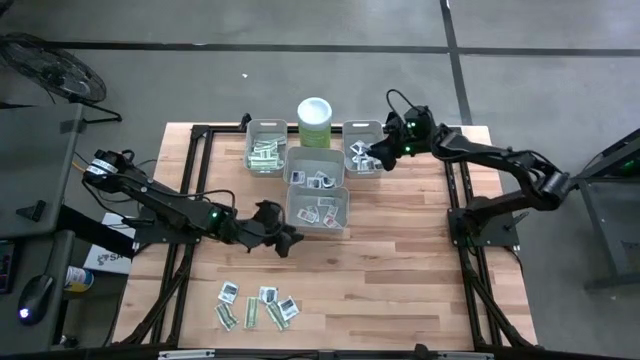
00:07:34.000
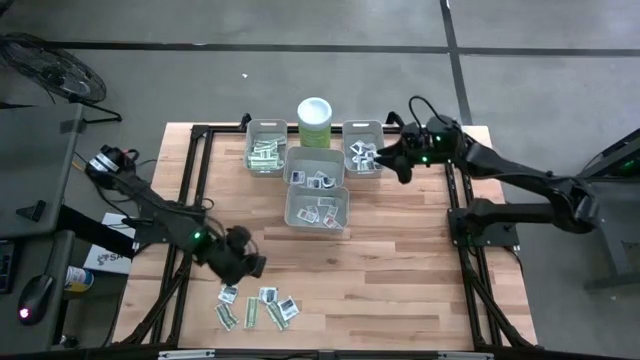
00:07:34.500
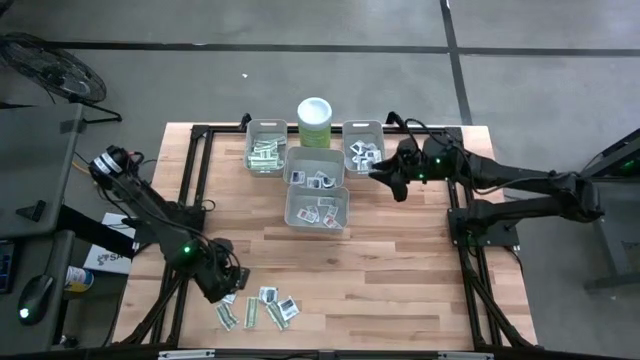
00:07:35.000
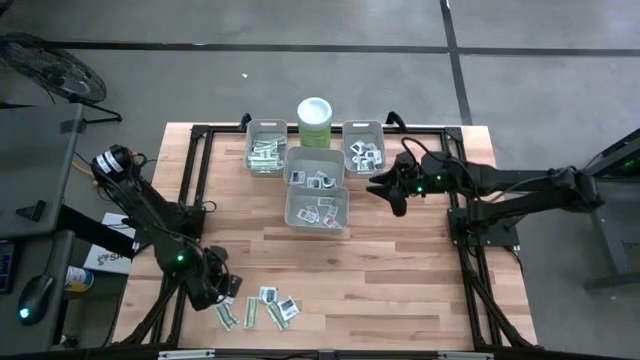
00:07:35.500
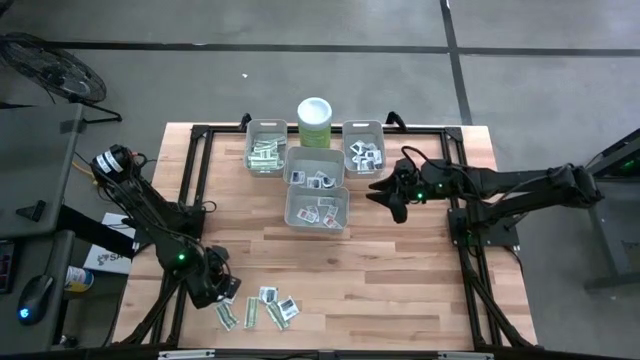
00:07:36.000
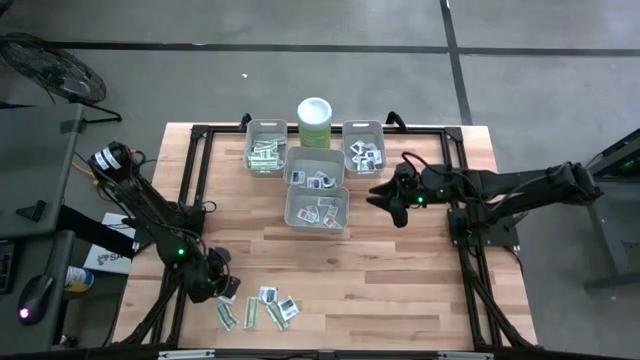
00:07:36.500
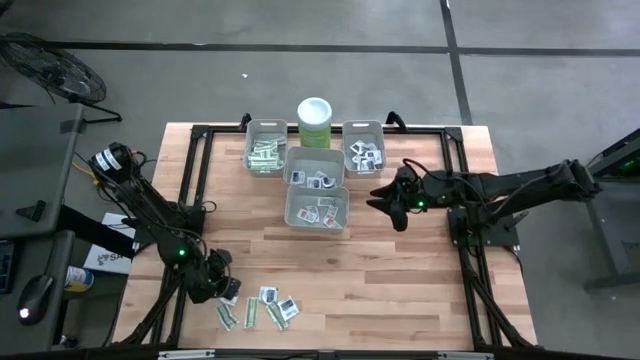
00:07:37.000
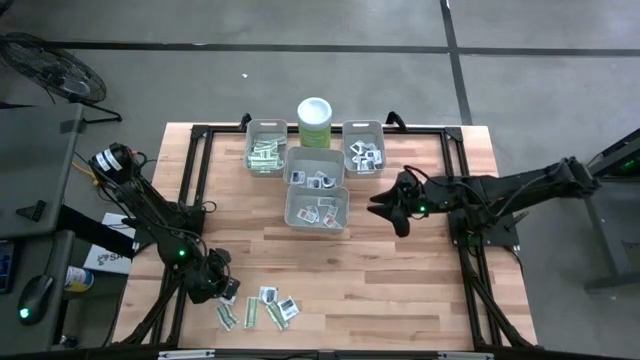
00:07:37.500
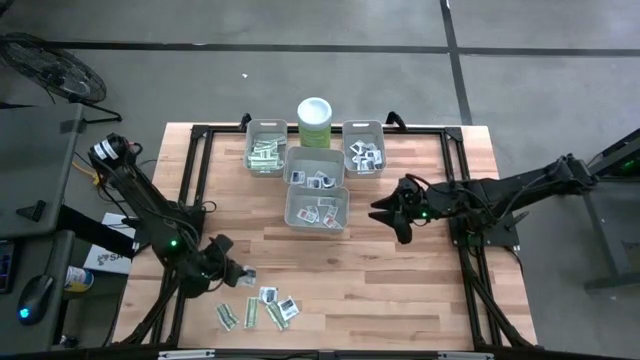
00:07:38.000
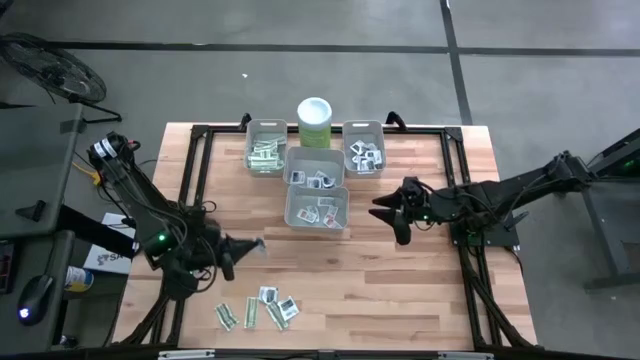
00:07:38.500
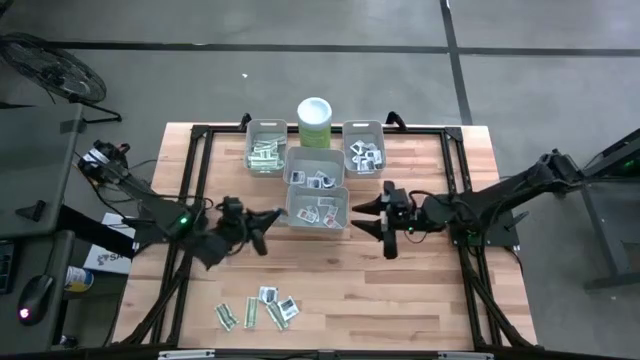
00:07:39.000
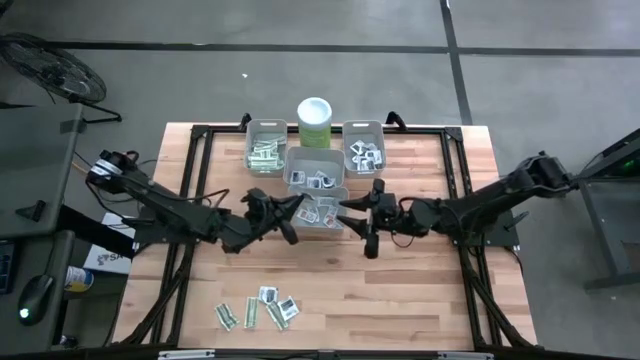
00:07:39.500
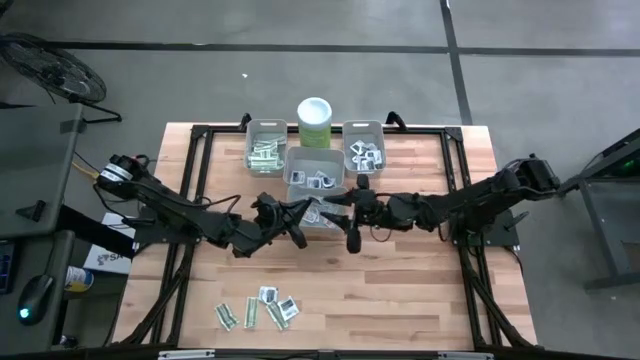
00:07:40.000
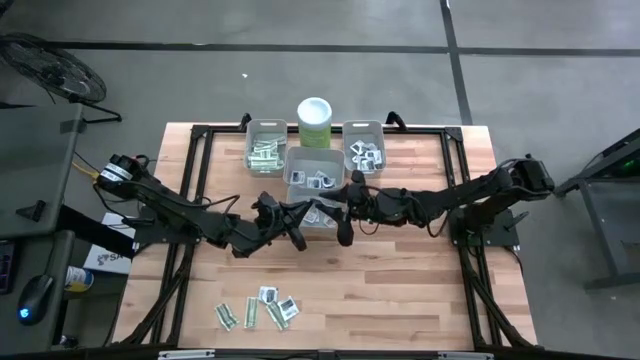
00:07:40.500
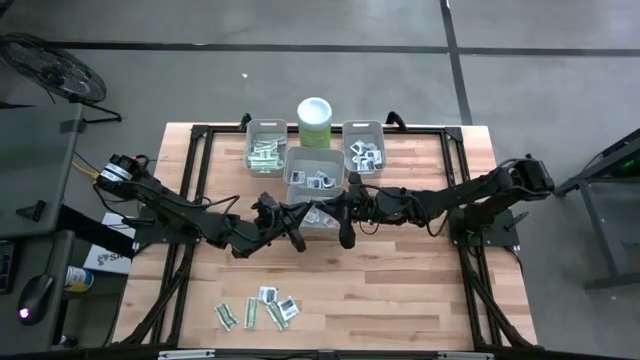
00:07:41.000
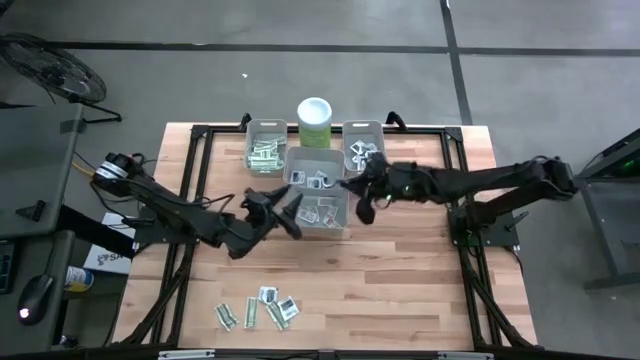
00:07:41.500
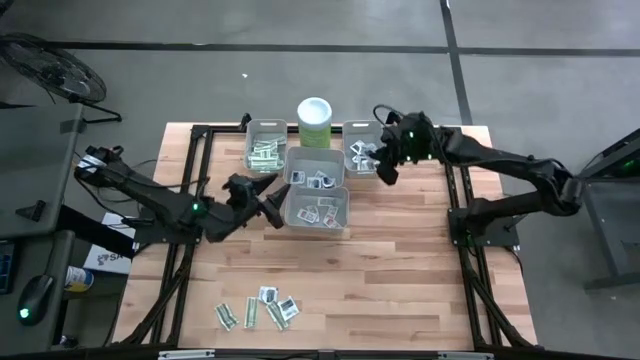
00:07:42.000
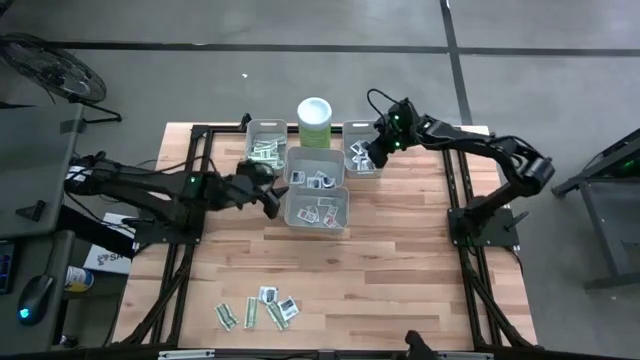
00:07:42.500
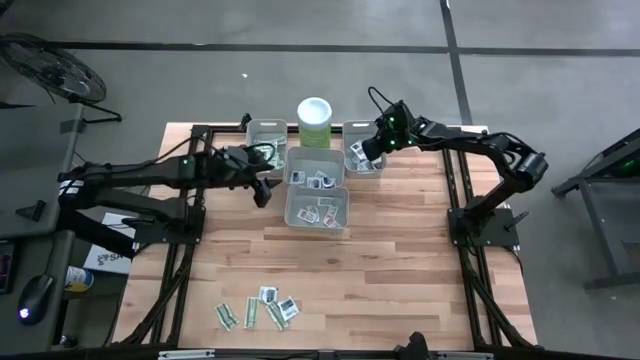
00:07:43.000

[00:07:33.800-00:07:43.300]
Task: Pick & Place First Aid Supplies
Put the left towelette pack into the right bin

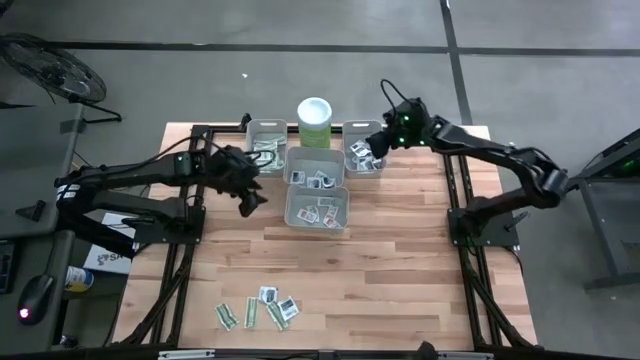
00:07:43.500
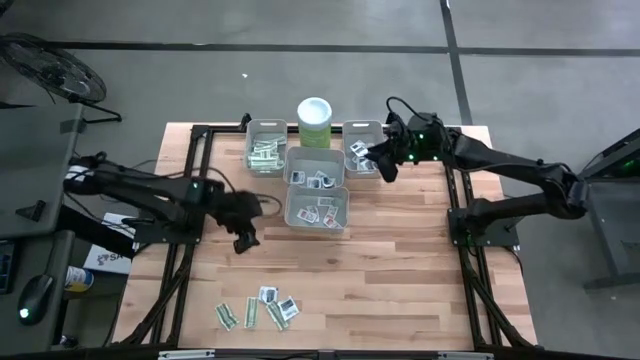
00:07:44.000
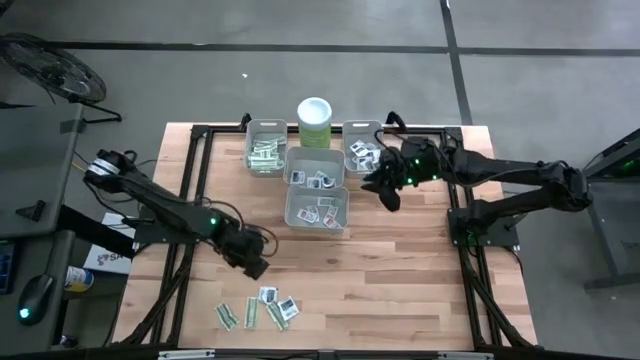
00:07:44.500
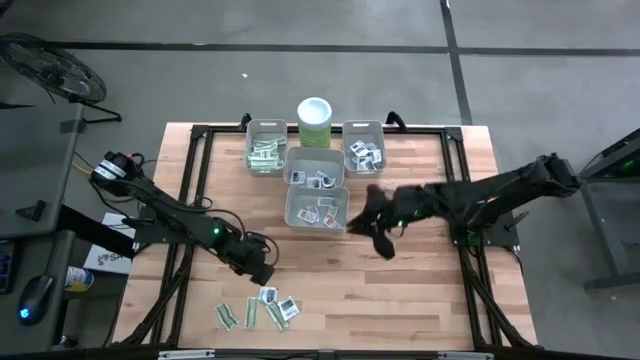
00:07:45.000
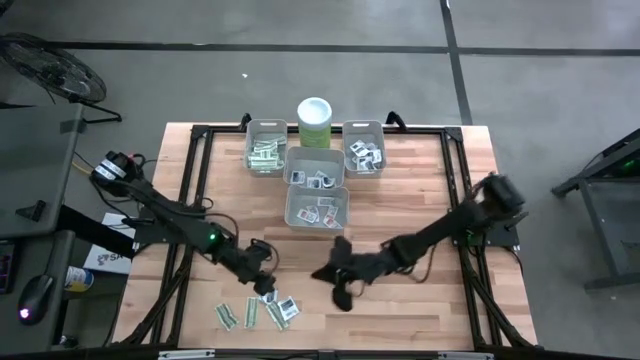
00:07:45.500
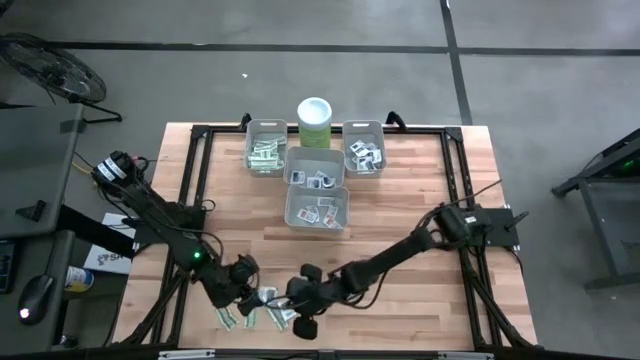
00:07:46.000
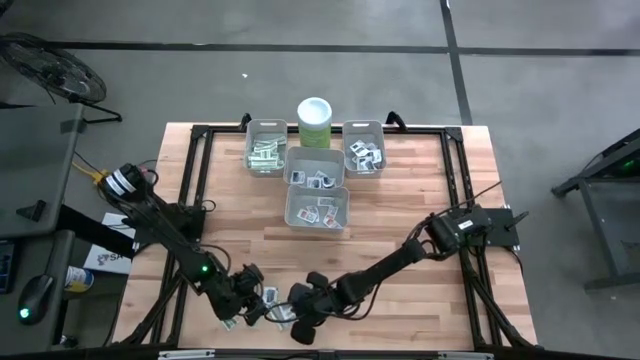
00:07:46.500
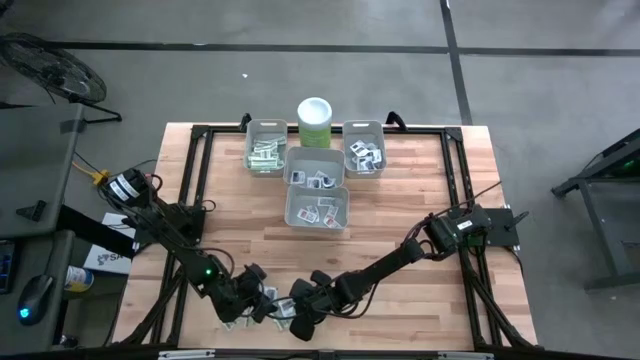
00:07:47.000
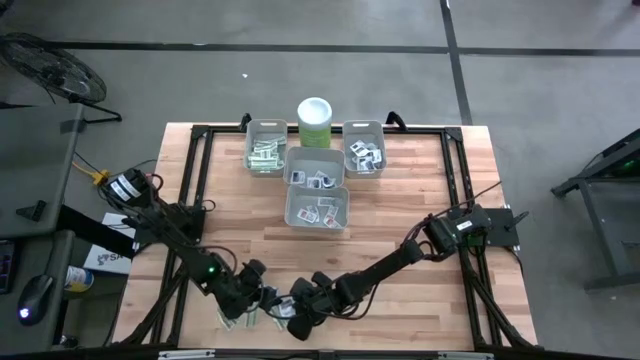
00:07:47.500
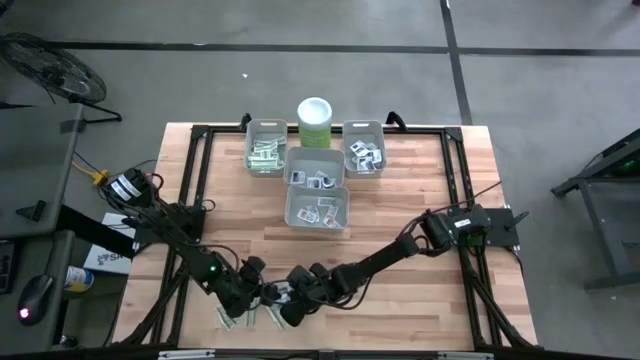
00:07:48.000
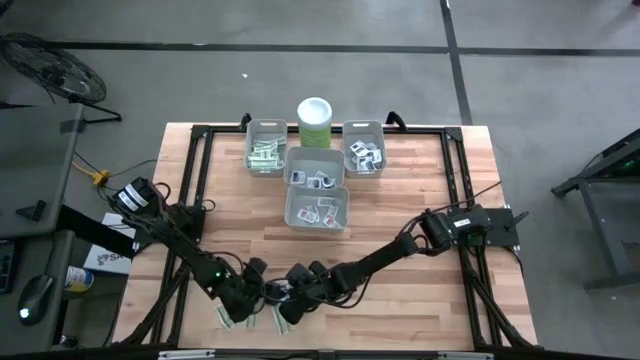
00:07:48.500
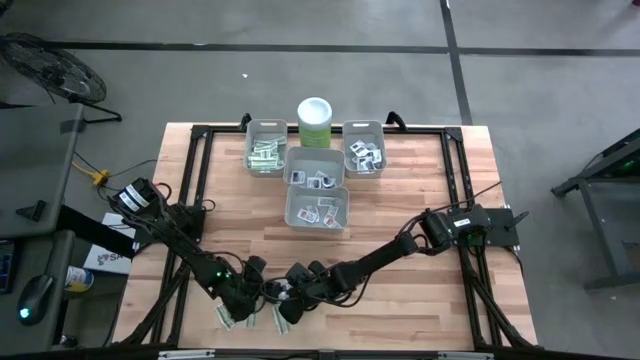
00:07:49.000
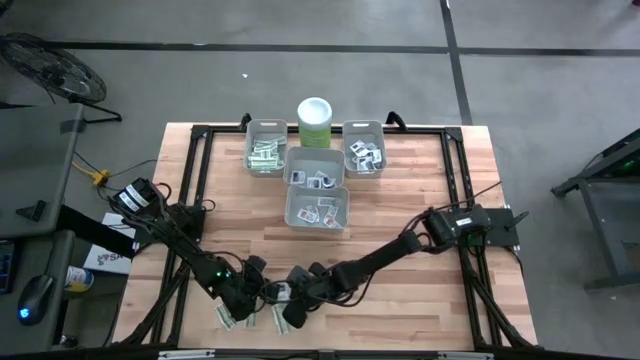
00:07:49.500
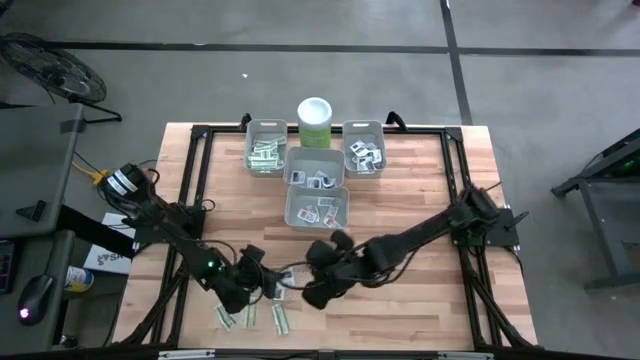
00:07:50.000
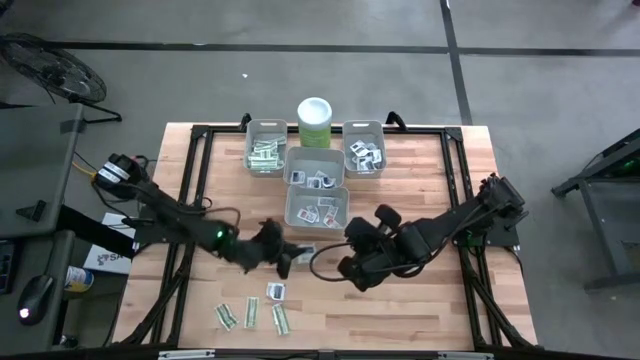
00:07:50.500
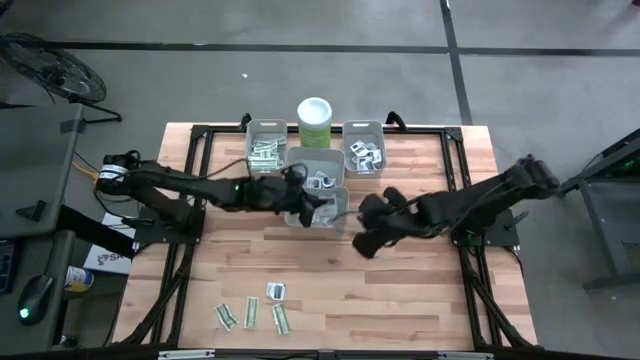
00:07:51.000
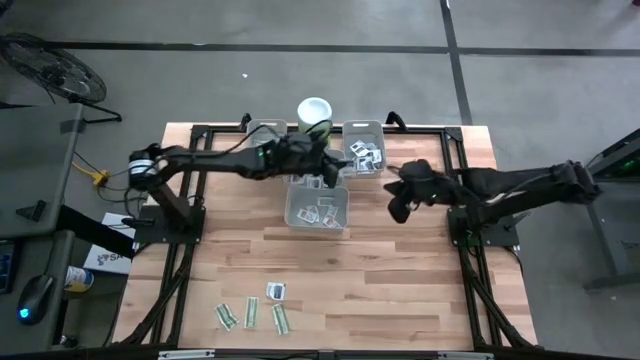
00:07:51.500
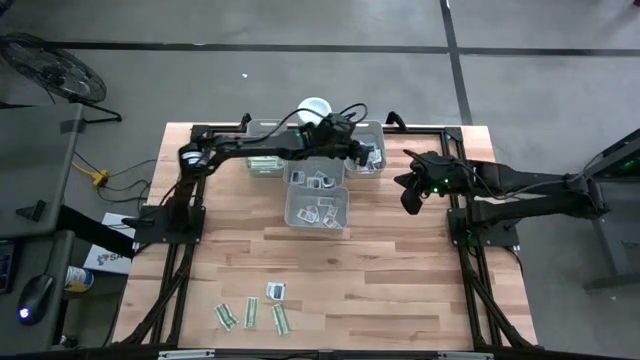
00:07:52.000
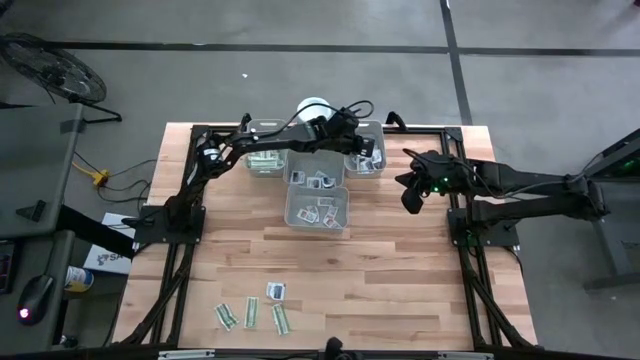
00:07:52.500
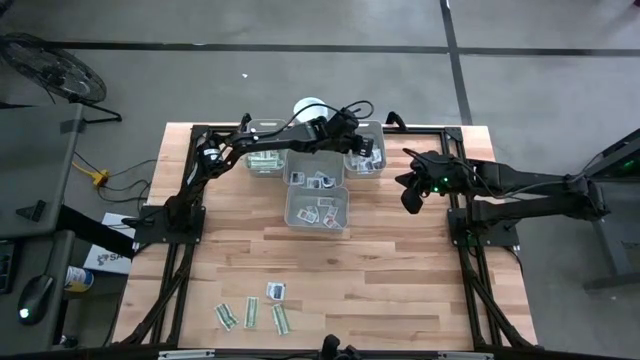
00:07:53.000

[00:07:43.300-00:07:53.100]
Put the right towelette pack into the right bin

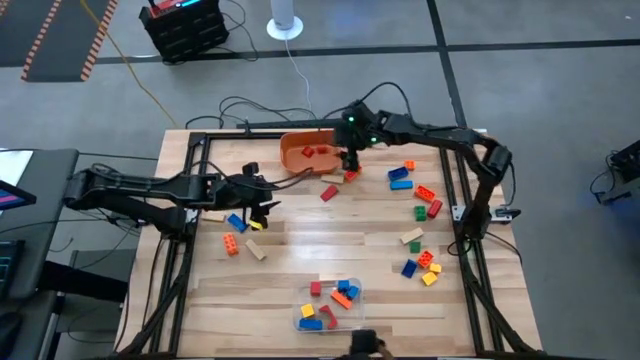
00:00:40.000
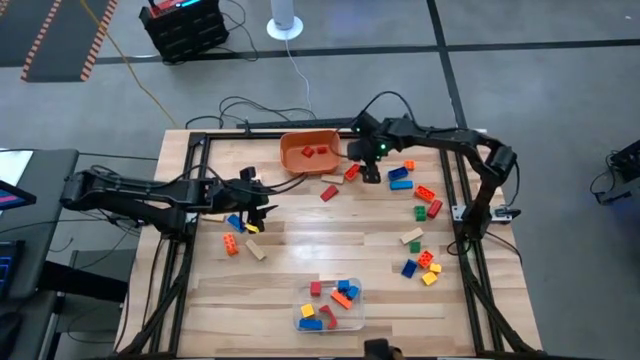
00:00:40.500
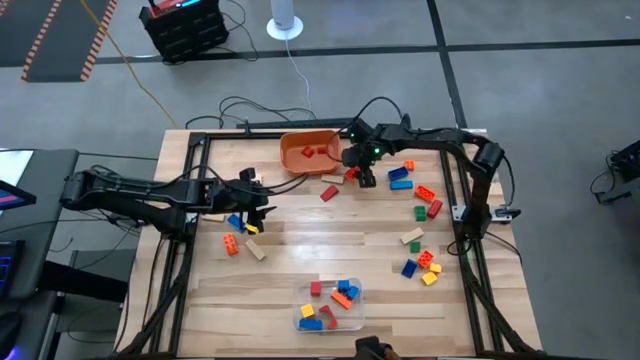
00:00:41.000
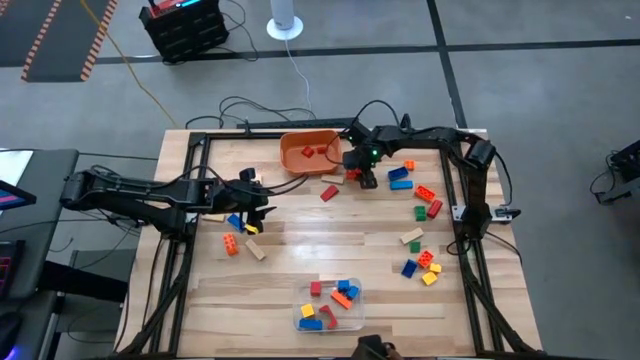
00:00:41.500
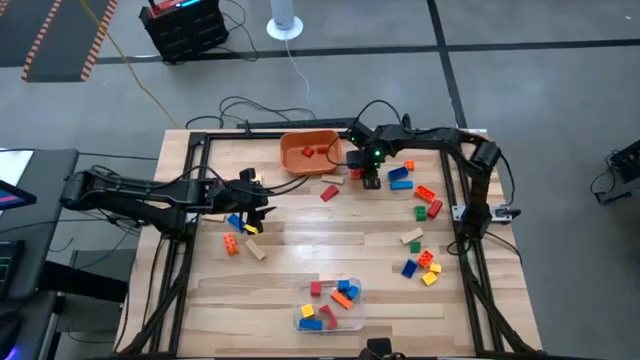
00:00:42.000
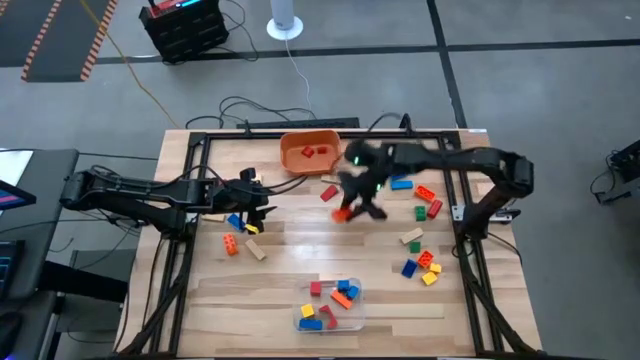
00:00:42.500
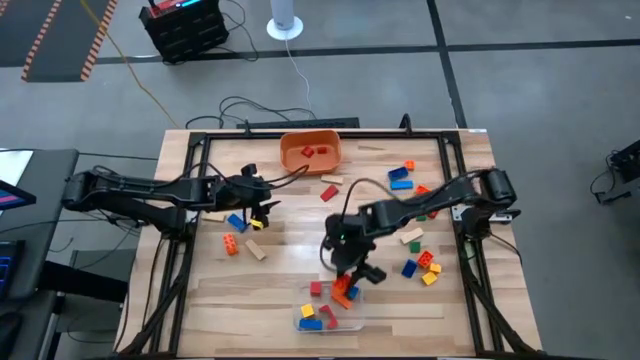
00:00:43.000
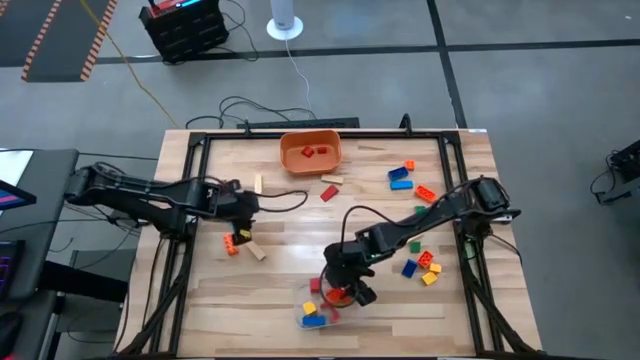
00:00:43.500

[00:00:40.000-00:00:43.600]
Task: Sort blocks by size
Put the large orange game piece into the transparent bin
